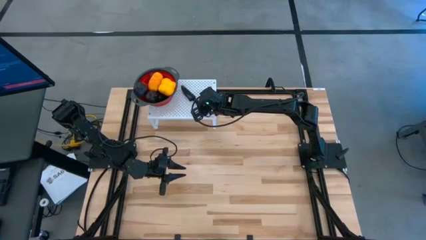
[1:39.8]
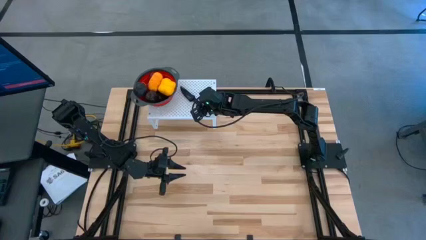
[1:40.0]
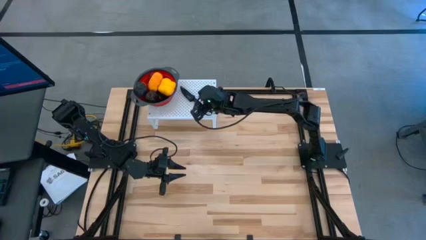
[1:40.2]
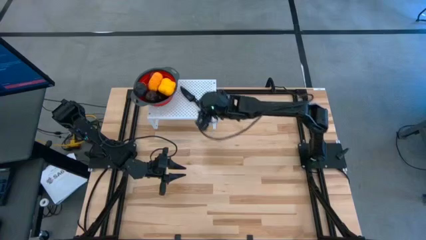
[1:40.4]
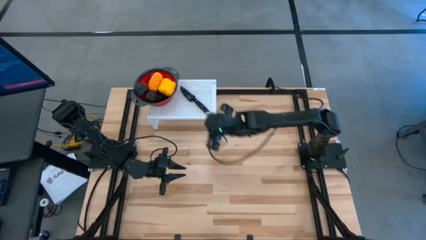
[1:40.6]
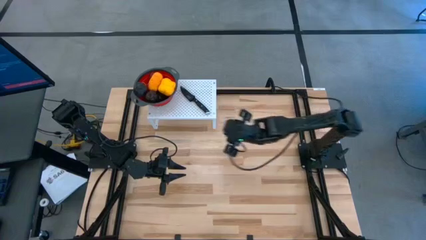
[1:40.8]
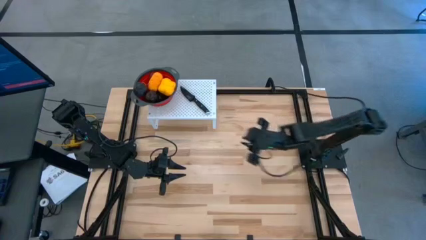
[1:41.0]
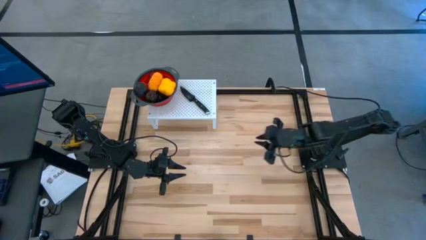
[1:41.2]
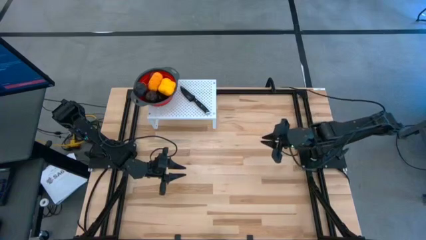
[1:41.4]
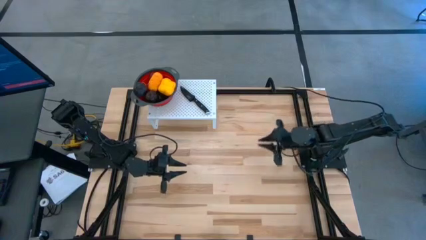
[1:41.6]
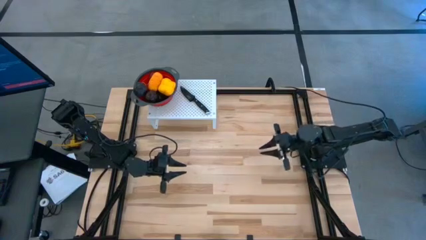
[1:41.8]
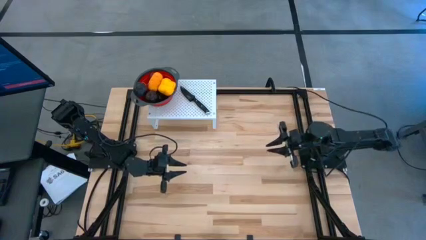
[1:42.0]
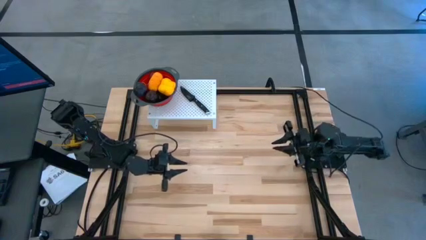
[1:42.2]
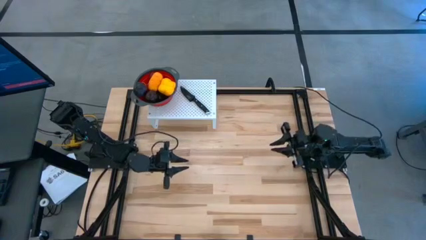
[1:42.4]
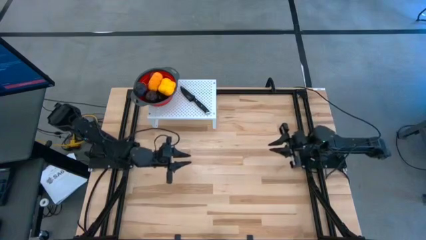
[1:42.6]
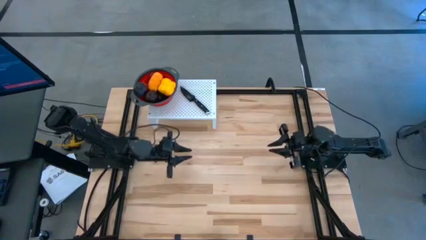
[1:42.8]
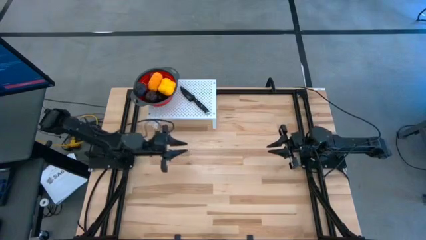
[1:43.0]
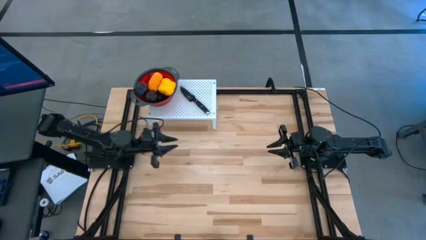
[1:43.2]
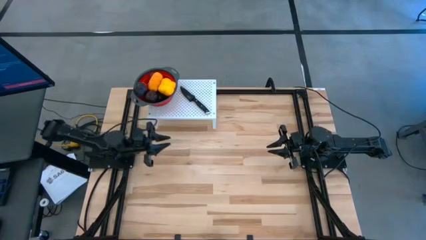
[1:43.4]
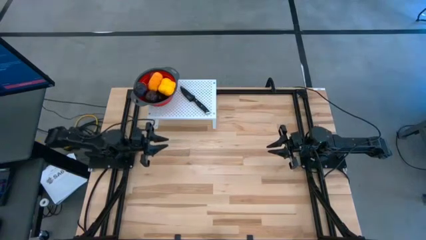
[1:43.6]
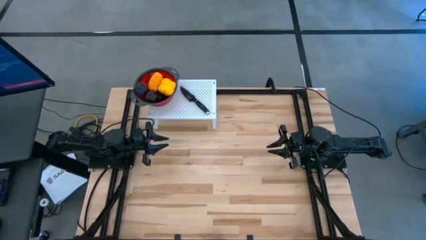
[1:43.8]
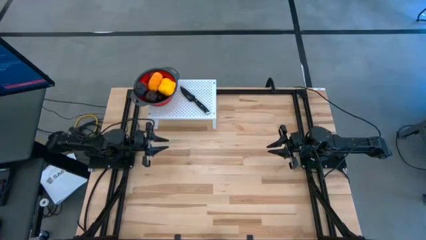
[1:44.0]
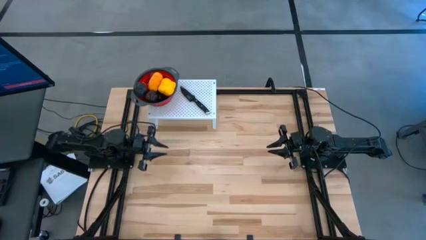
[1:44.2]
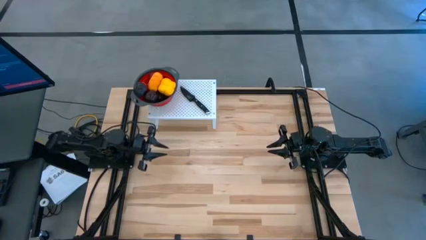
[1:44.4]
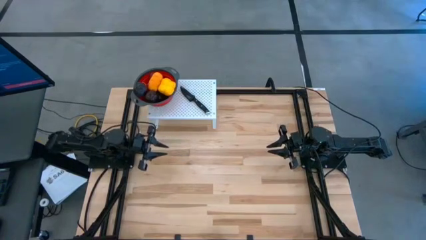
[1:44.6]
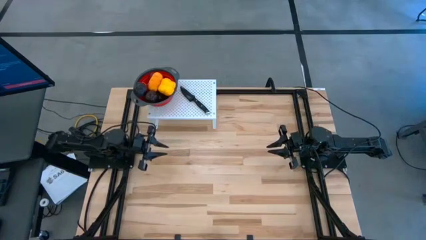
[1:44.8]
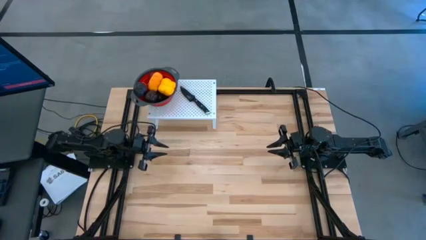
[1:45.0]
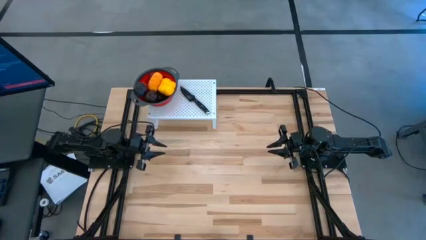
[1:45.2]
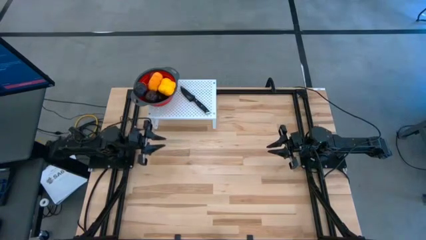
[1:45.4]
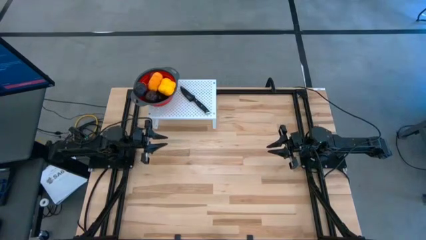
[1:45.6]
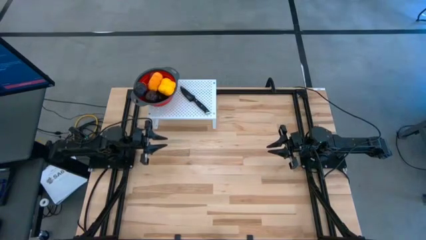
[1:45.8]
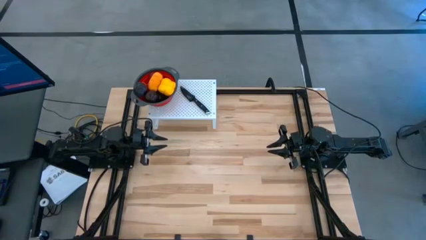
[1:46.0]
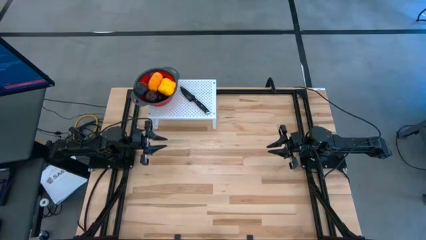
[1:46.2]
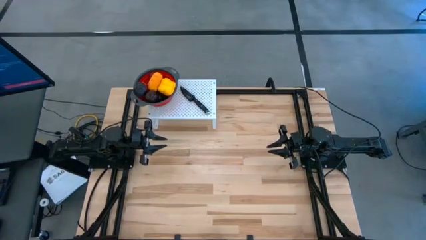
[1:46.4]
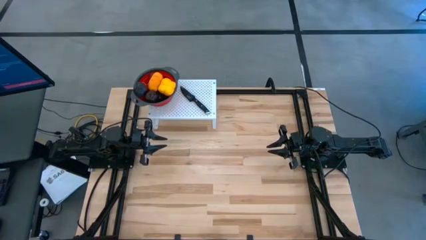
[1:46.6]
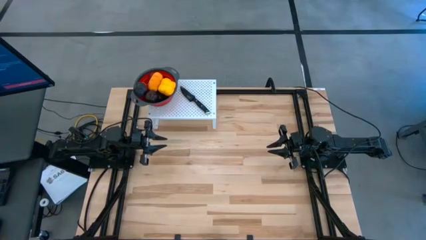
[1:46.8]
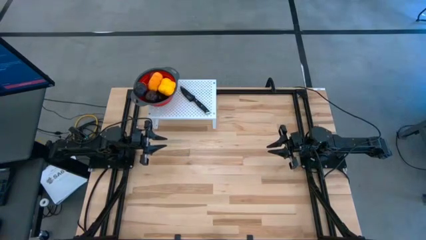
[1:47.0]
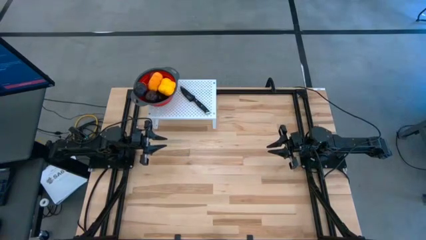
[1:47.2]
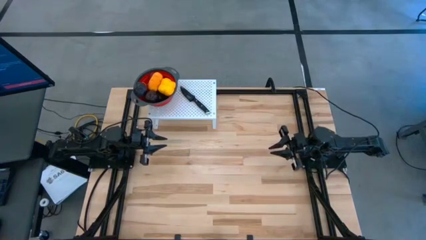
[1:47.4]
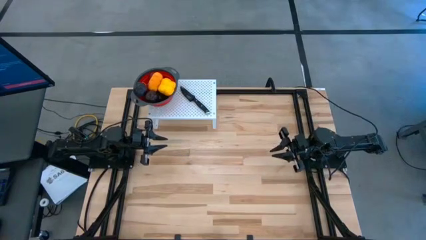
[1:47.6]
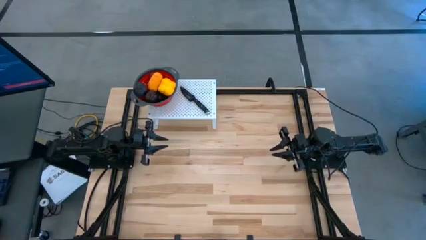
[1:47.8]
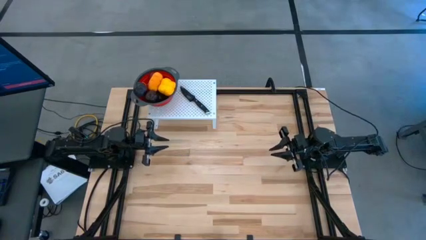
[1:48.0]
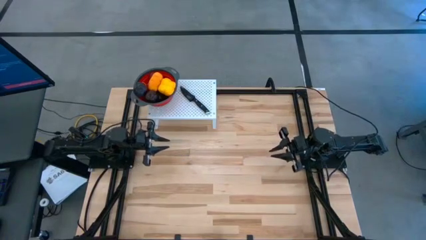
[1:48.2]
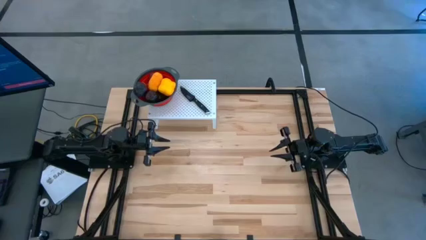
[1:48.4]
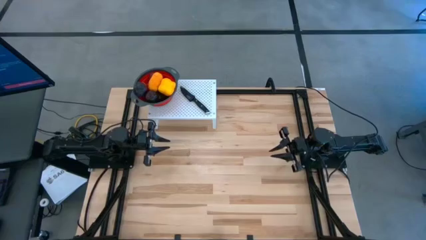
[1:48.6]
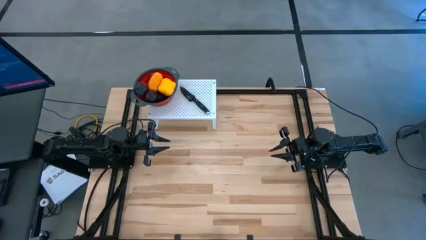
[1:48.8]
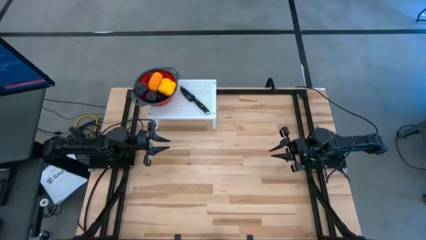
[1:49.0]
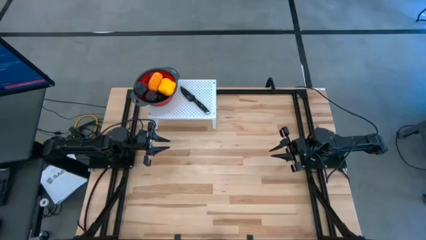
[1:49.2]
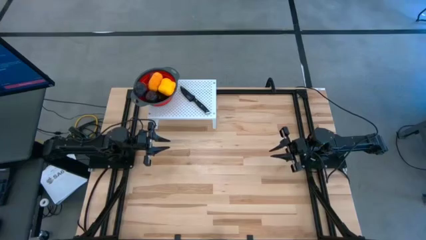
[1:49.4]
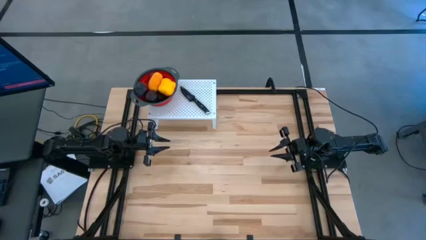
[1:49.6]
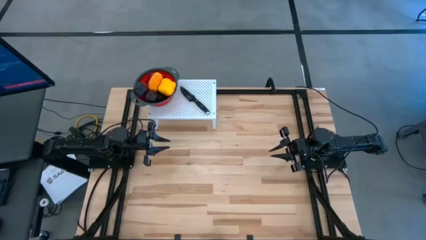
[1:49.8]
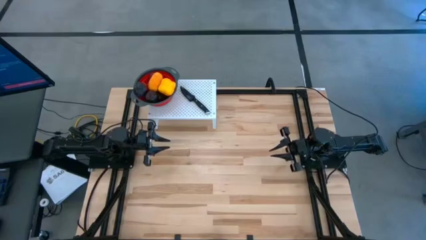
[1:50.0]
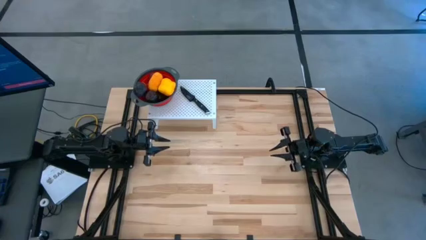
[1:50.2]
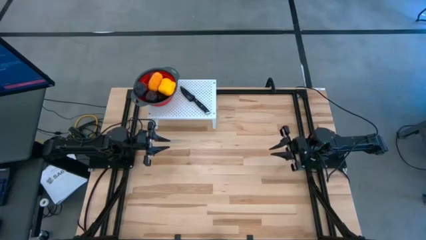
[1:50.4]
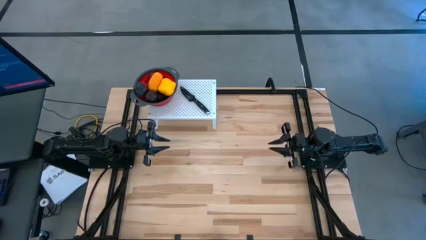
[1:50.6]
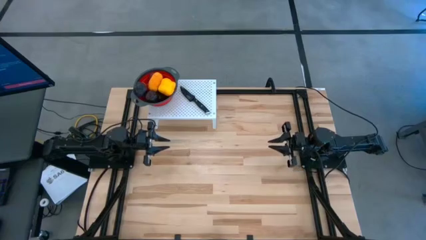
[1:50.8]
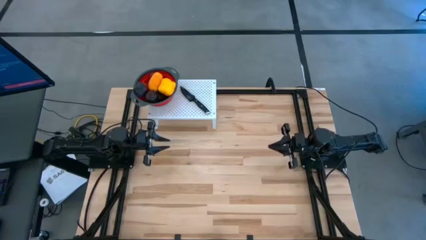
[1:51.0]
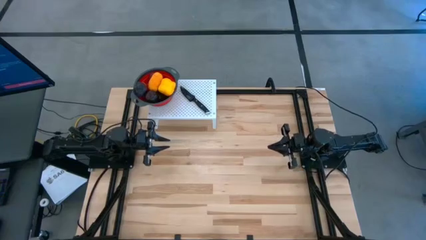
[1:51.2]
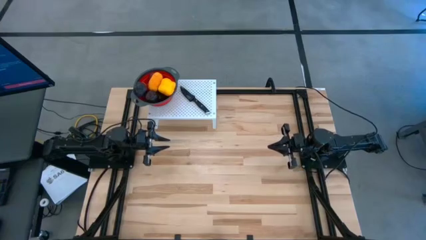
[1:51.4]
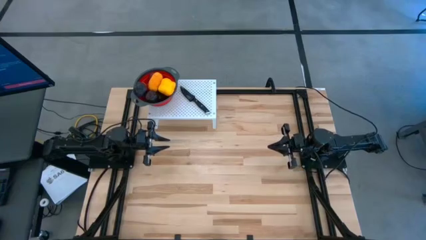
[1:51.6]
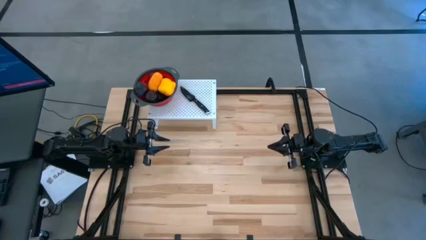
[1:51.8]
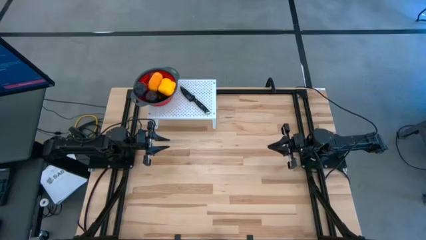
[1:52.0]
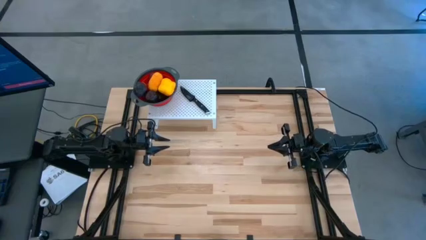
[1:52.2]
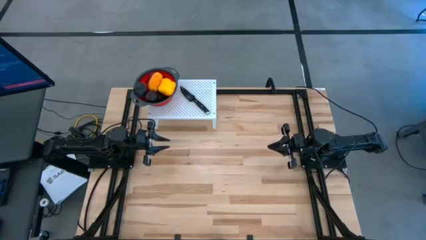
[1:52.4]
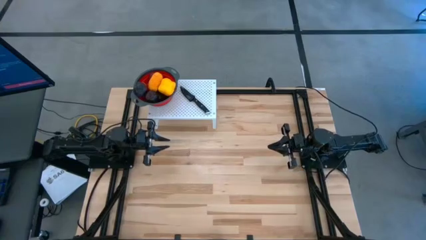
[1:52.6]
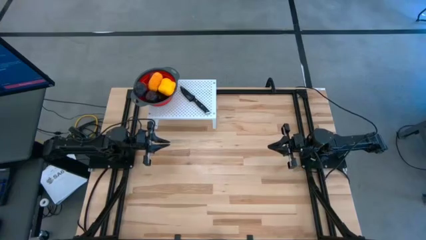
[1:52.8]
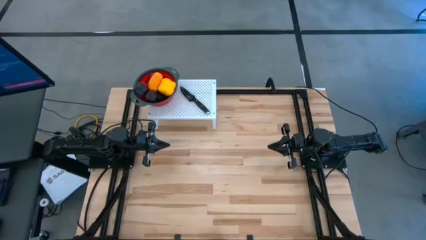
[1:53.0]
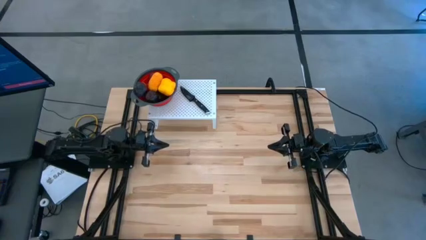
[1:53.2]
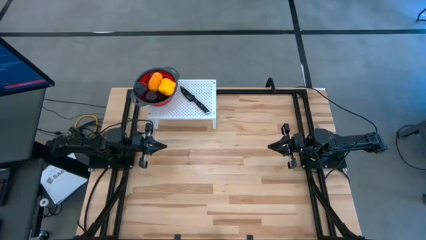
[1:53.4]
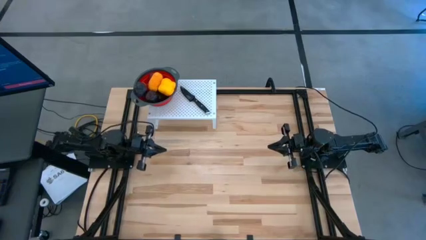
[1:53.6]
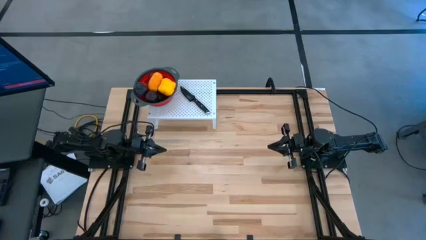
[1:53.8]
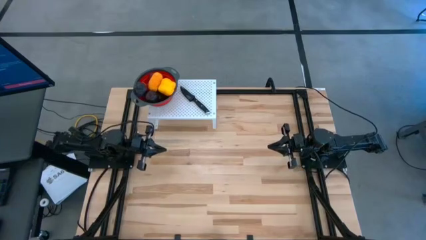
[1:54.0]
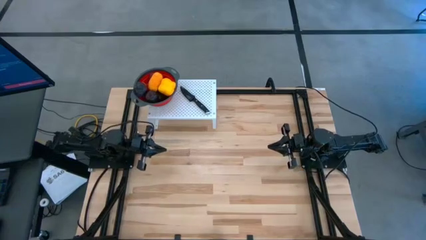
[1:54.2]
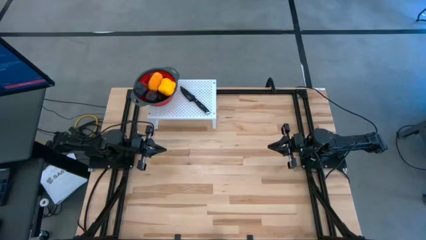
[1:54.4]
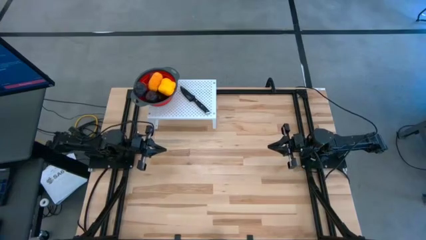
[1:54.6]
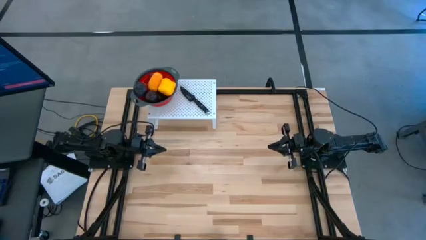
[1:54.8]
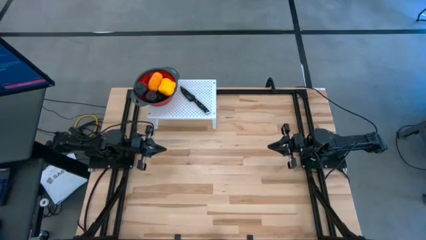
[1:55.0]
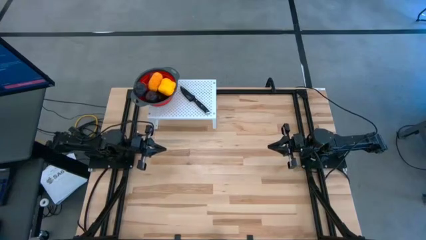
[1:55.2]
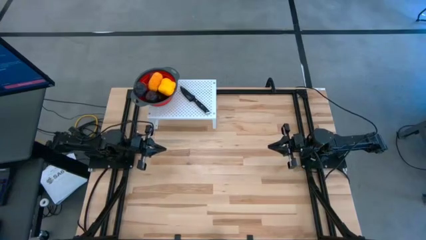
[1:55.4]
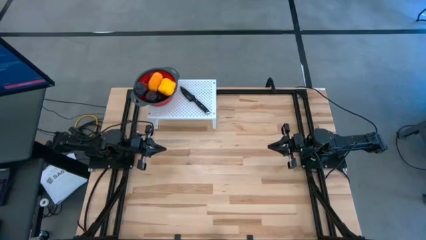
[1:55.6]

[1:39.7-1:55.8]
Task: Pick & Place Fruit
Return to Home Position
